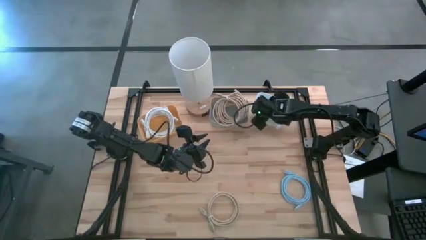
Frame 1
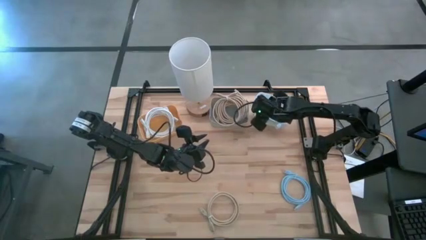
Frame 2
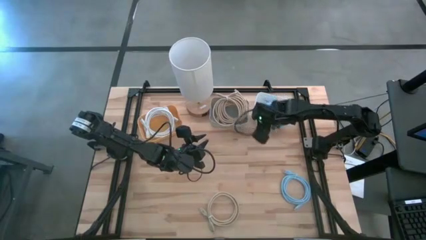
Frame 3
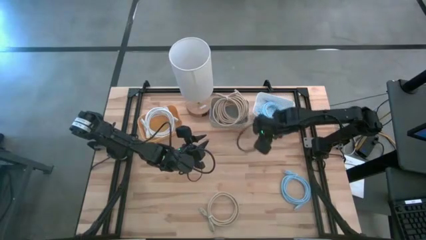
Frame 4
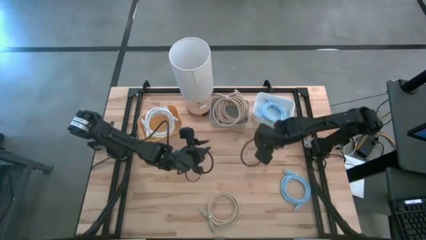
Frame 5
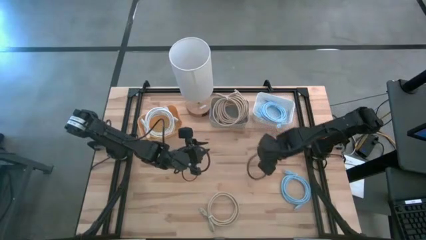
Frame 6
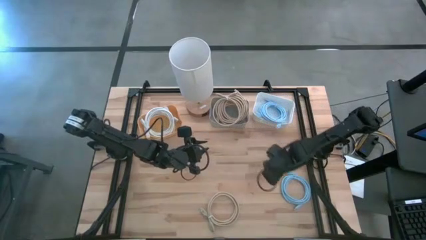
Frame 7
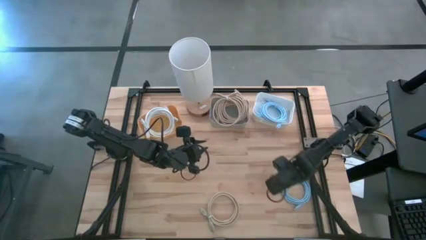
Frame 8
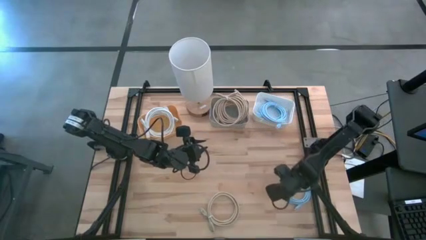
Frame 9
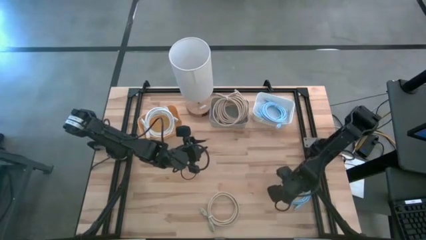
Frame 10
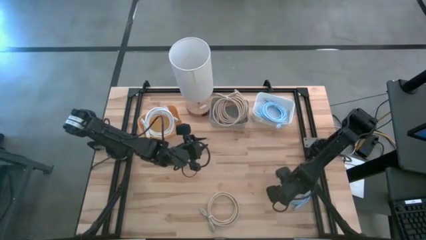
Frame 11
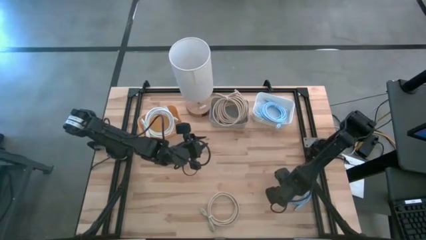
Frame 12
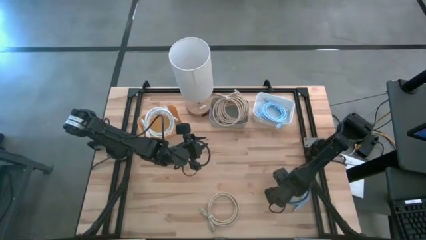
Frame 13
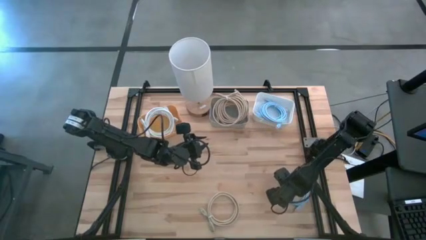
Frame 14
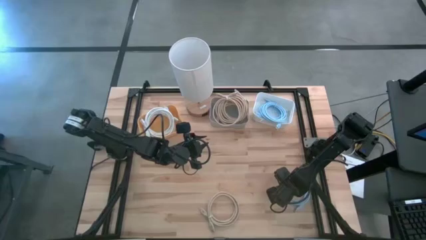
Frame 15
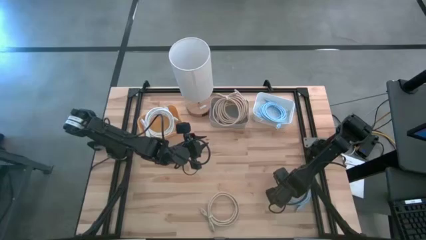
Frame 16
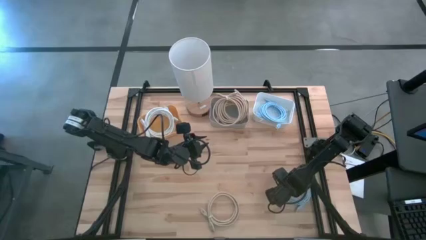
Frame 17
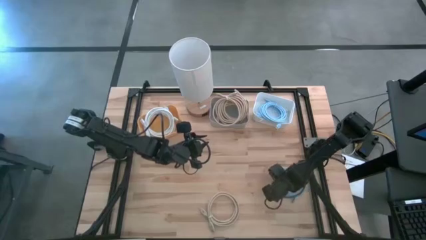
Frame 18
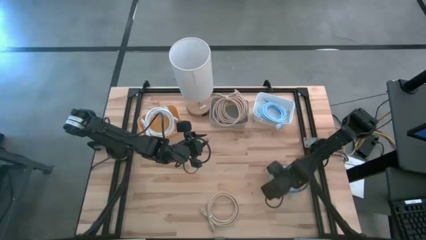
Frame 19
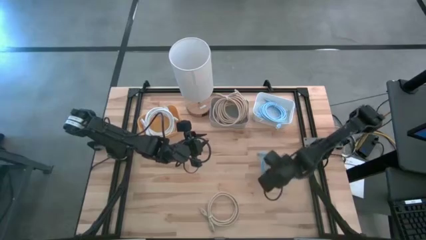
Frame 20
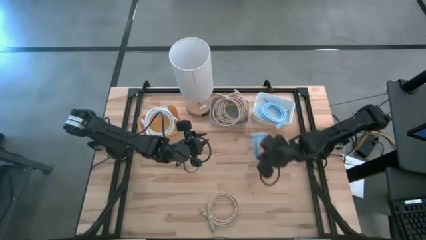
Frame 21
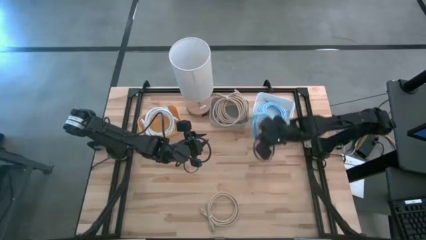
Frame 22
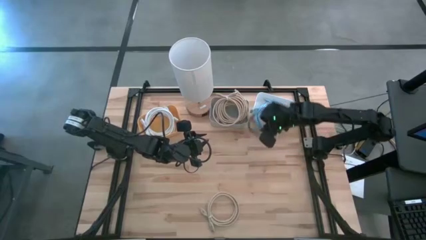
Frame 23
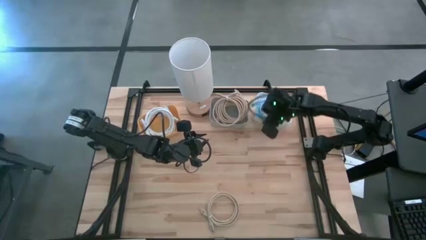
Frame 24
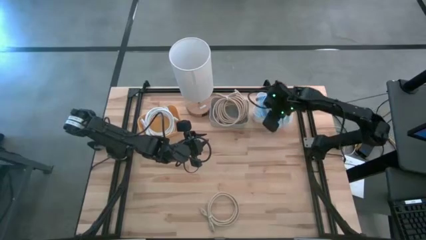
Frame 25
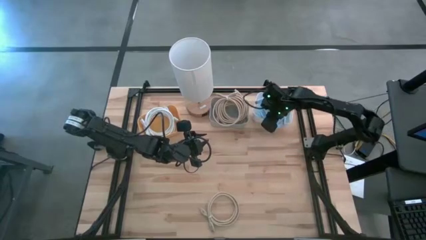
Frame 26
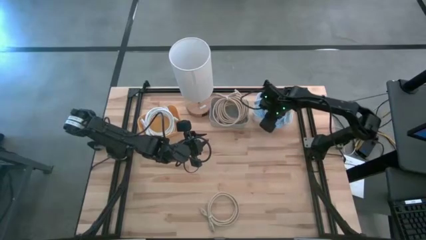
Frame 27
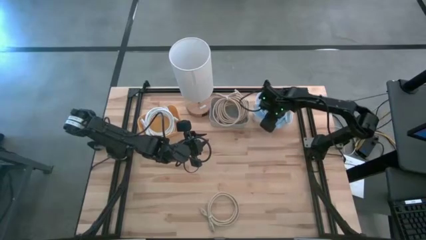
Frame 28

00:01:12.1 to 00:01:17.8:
Task: Sort HDMI cables
Put the blue HDMI cable into the white bin

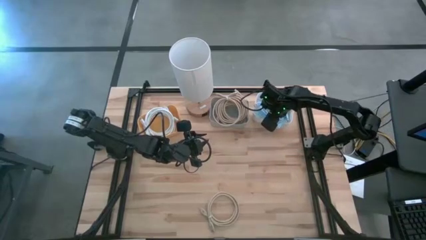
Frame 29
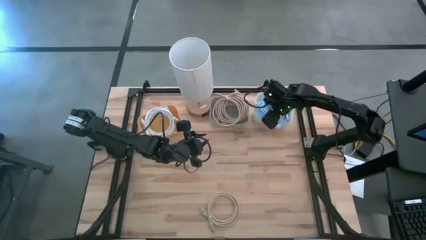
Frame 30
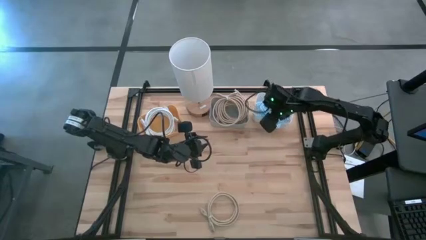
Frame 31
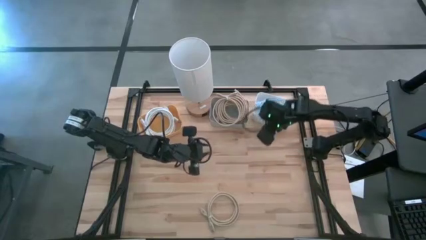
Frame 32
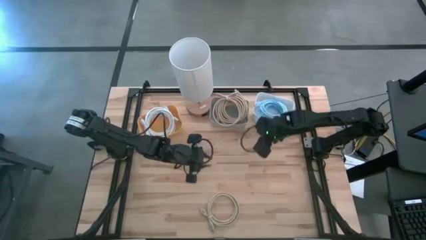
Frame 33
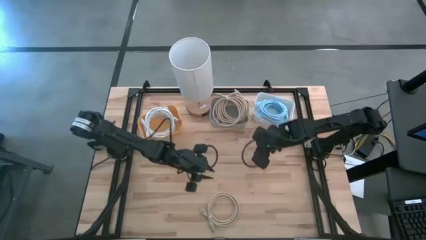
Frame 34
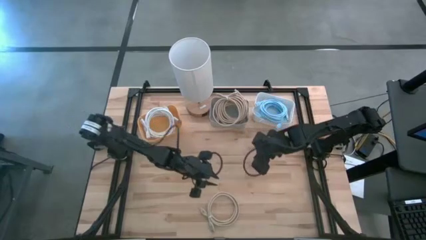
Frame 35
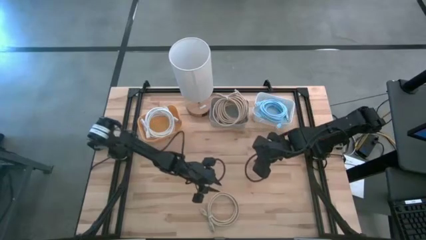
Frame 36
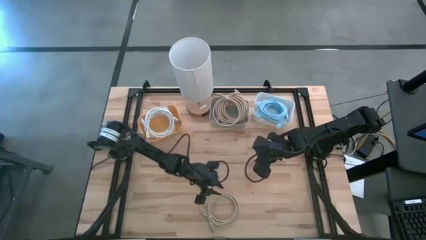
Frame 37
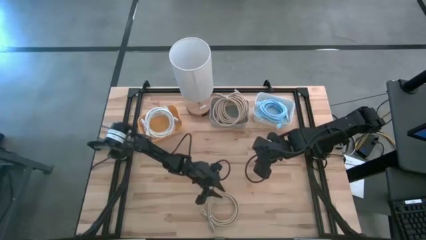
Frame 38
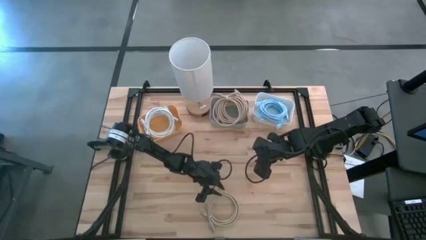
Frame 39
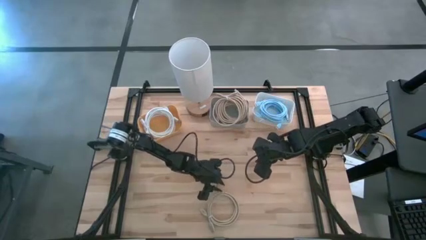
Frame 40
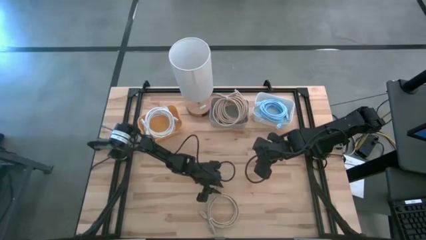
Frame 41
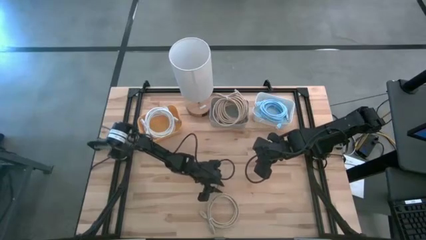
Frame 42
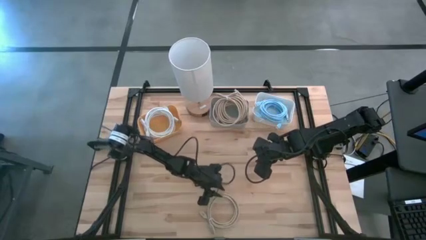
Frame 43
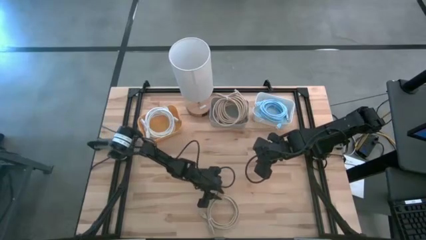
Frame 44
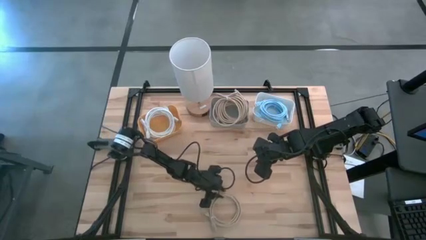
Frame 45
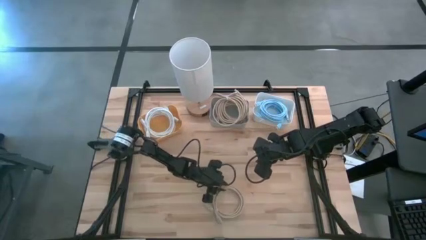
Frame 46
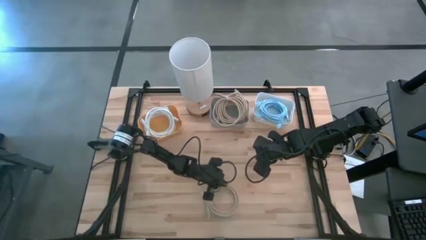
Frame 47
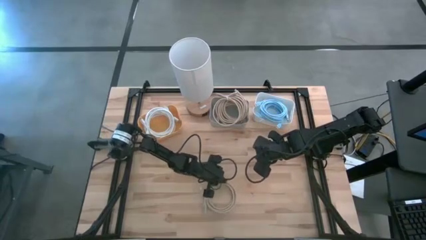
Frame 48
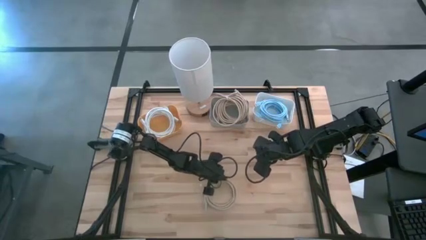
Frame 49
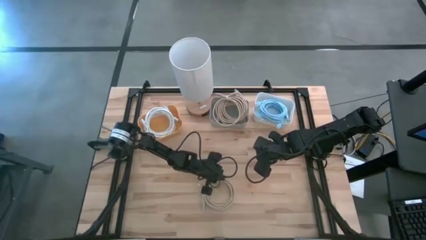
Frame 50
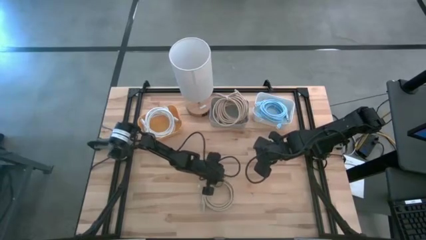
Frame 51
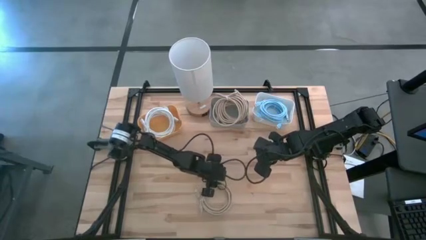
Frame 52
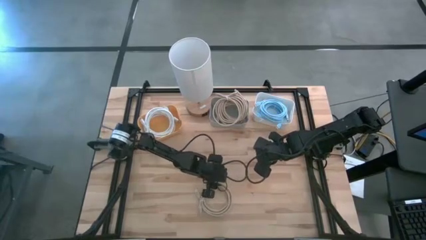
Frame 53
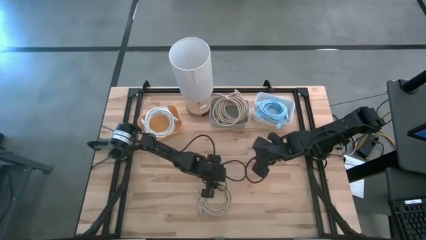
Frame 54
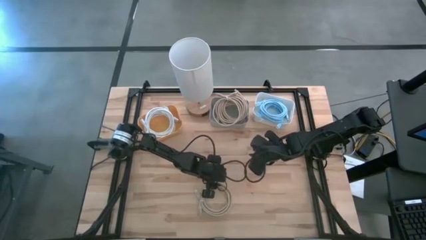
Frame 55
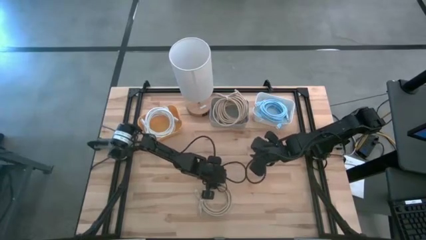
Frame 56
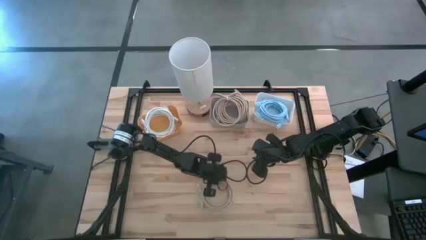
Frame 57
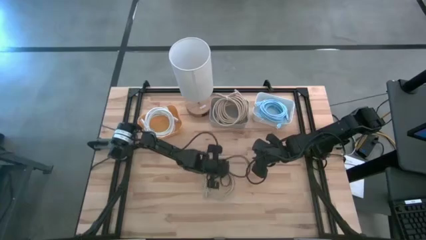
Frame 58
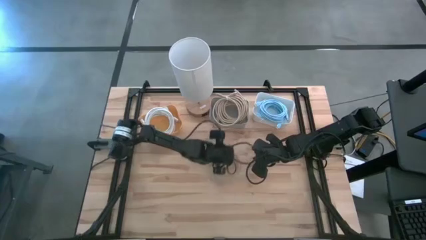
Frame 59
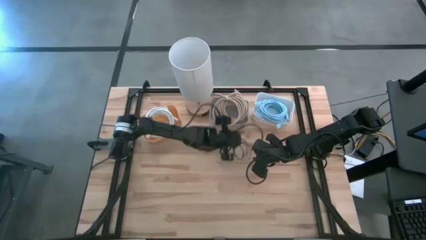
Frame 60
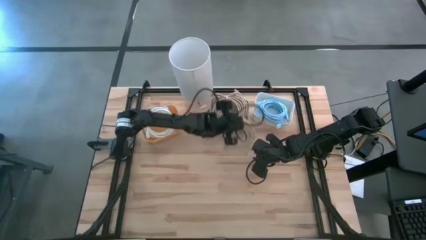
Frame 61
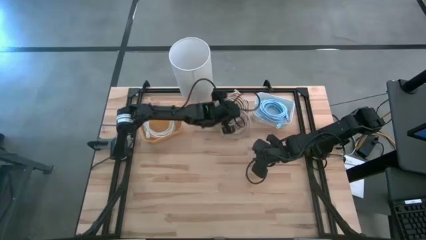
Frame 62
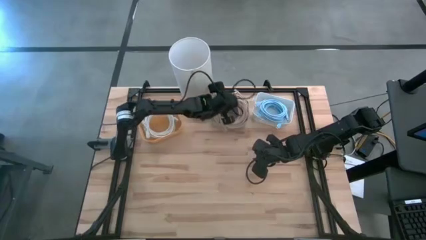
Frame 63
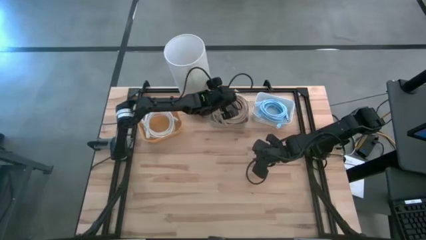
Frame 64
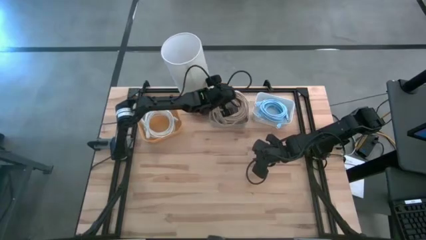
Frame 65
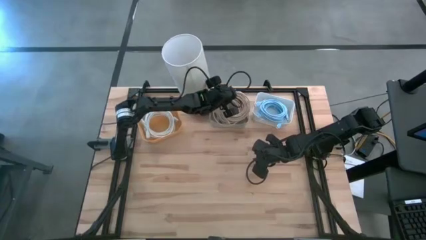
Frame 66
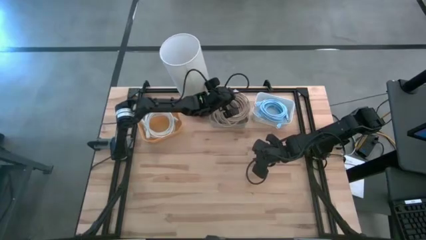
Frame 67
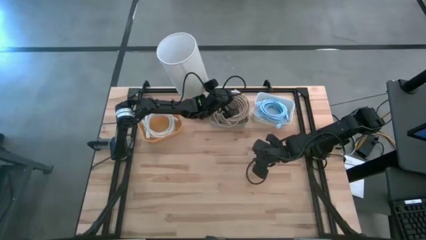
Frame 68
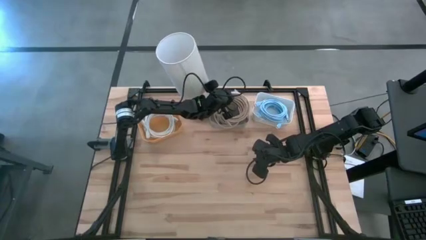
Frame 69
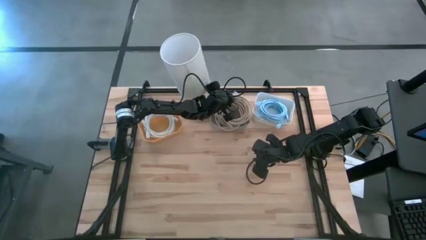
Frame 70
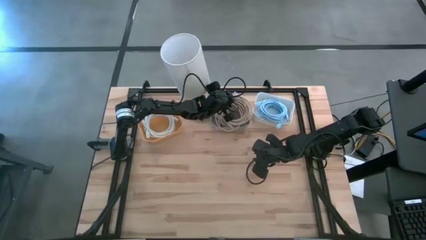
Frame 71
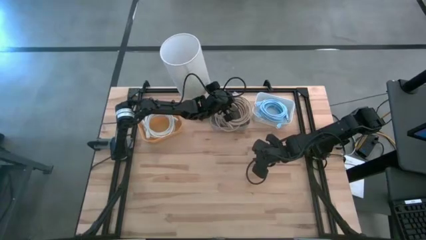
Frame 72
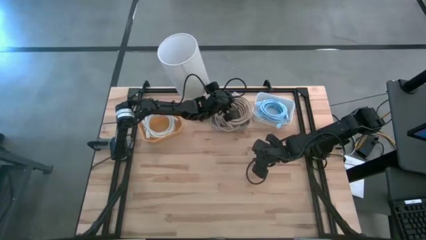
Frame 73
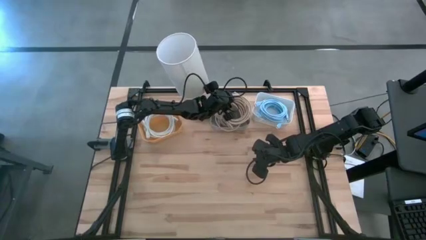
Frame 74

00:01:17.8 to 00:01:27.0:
Put the brown HDMI cable into the gray bin
